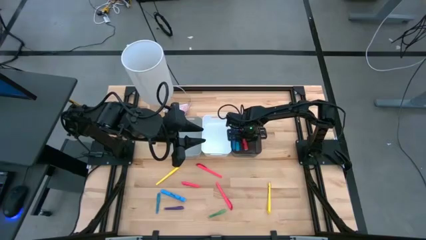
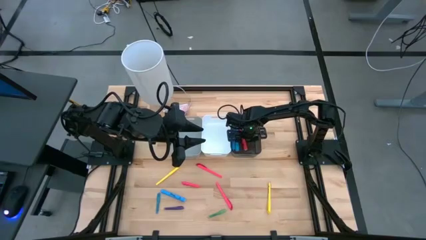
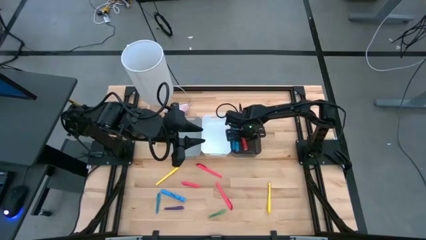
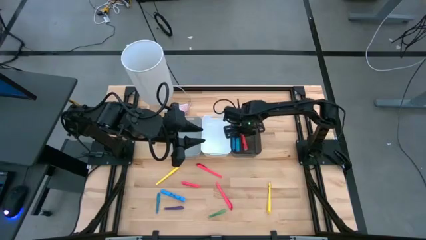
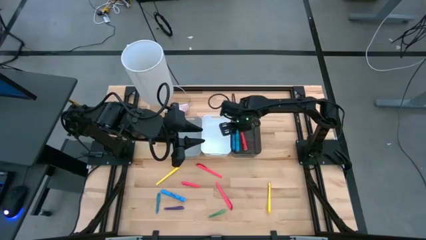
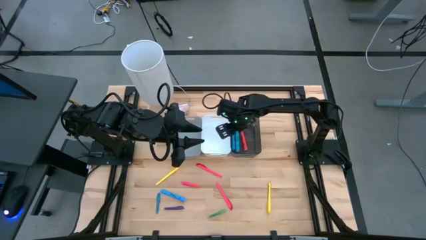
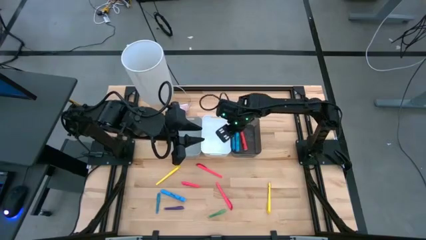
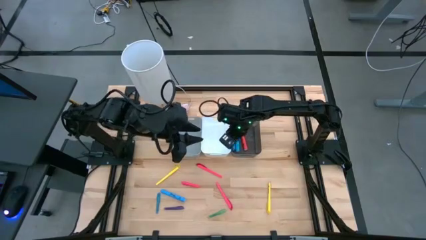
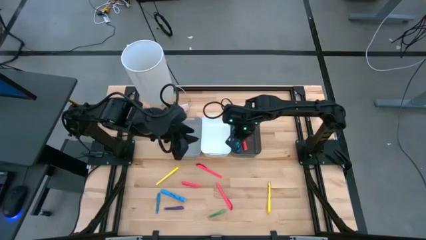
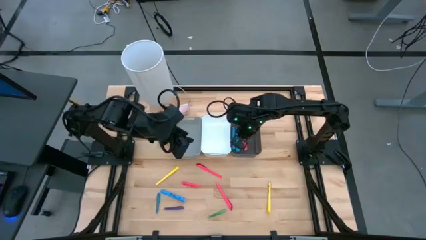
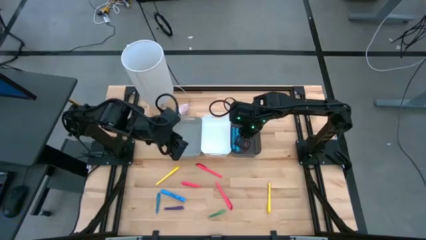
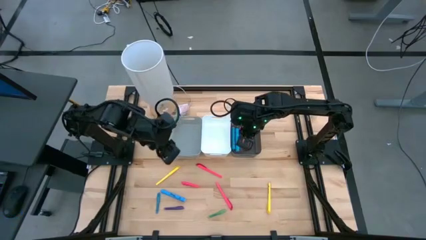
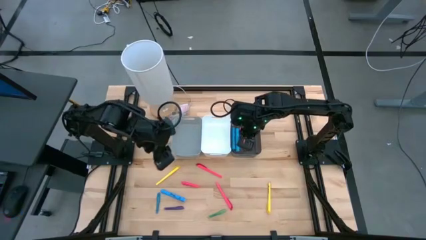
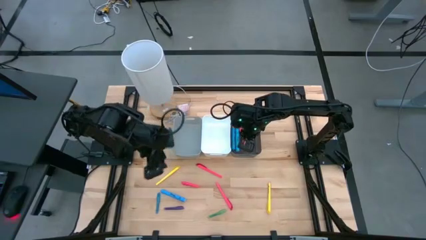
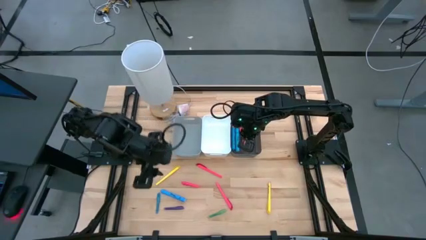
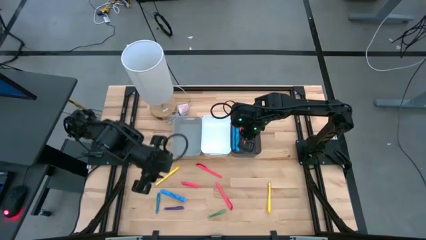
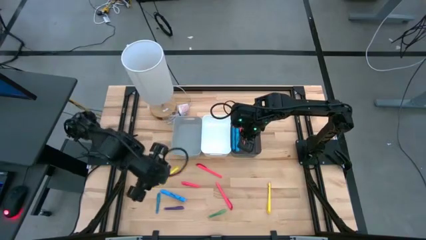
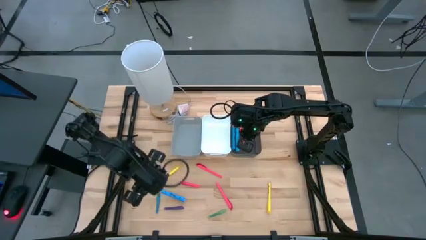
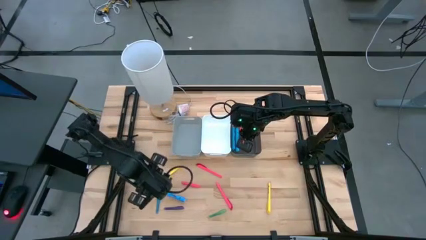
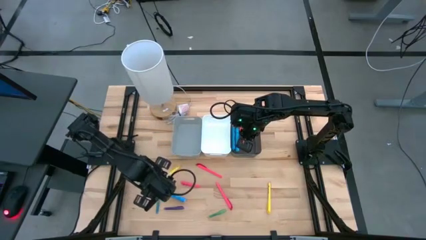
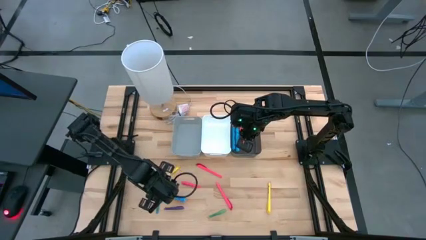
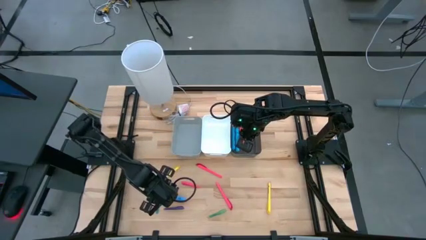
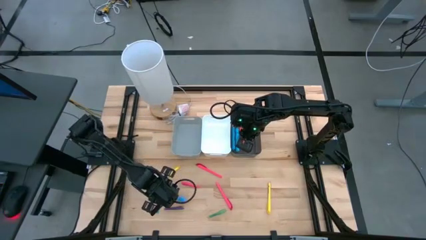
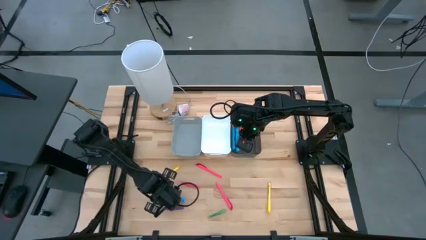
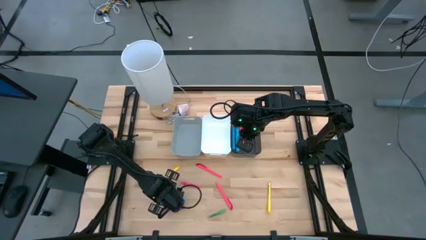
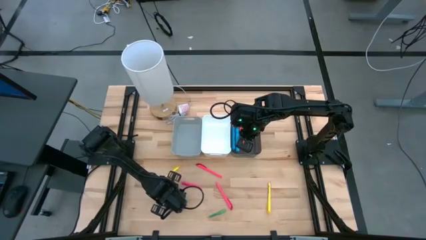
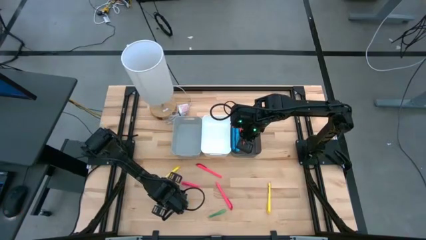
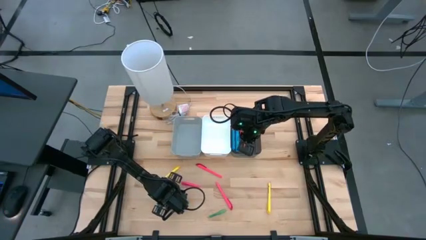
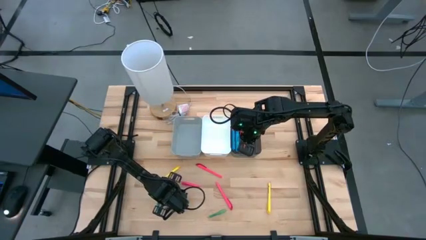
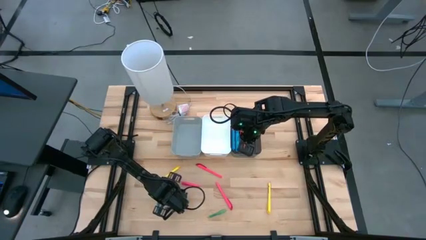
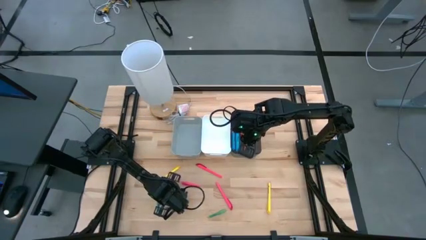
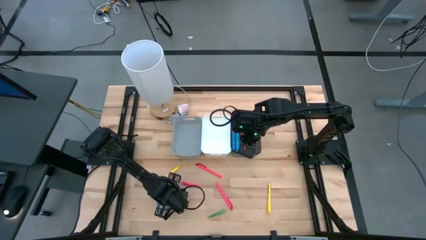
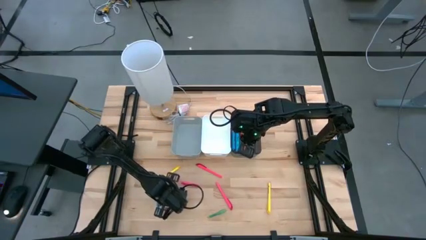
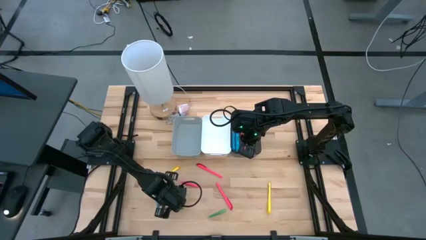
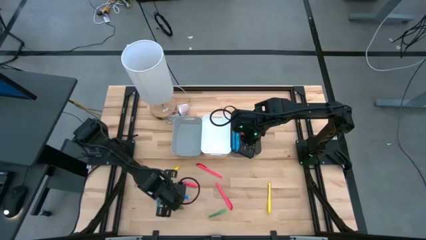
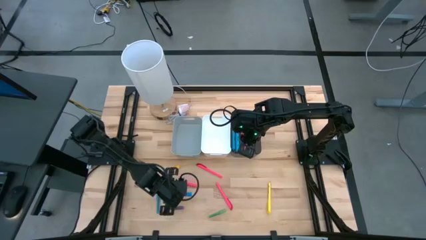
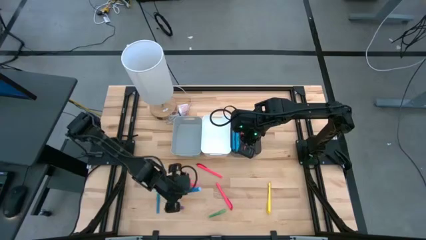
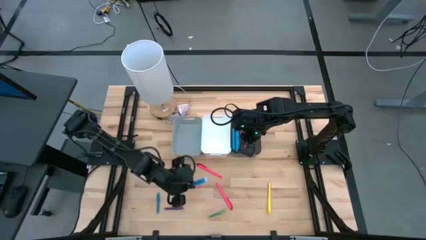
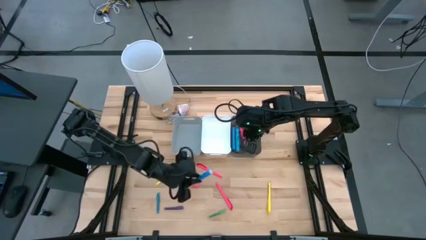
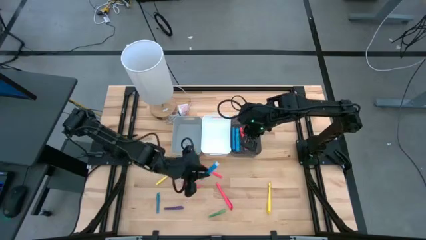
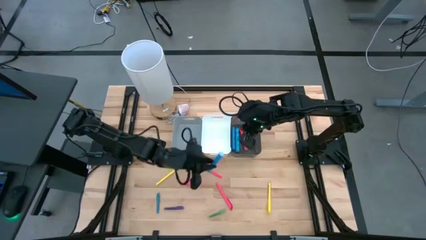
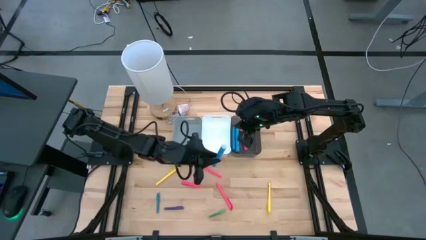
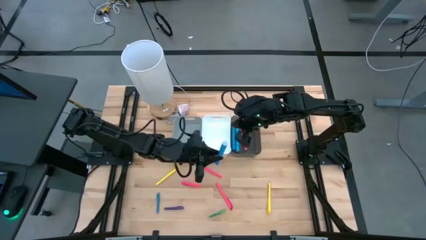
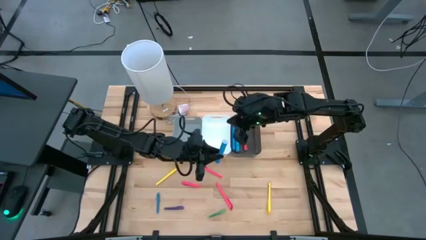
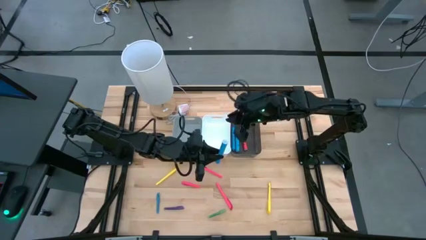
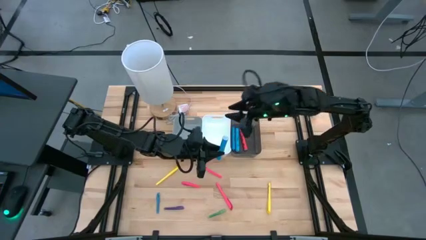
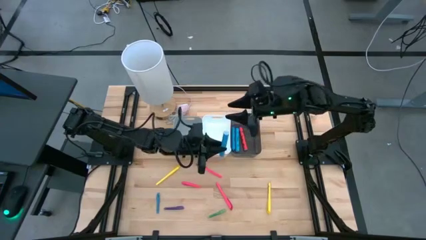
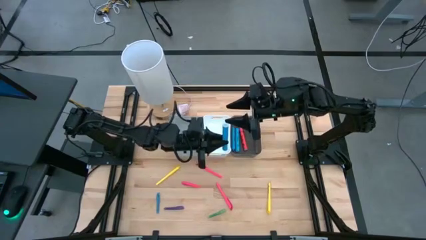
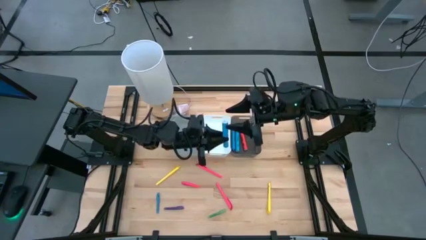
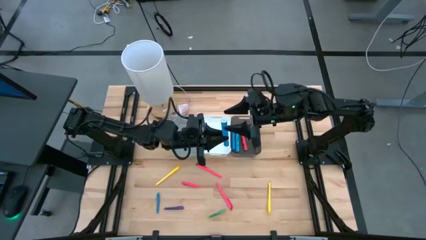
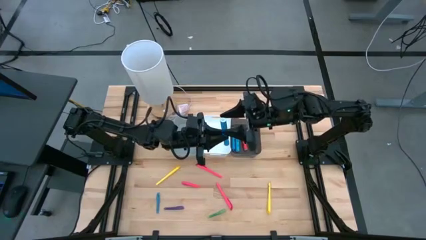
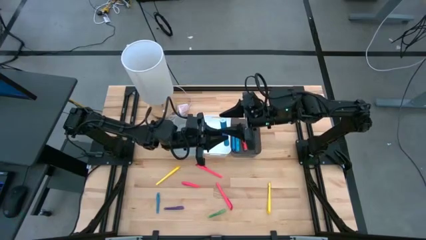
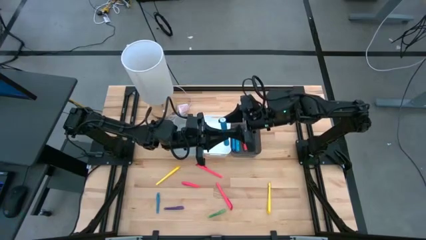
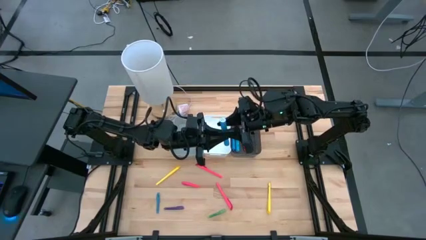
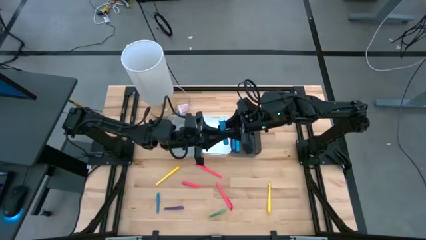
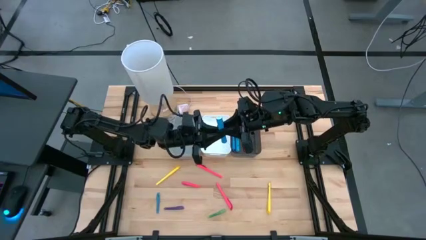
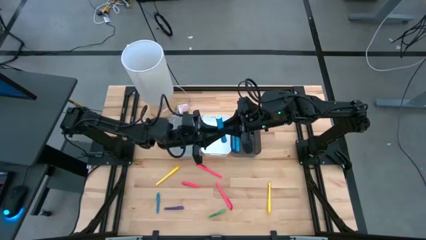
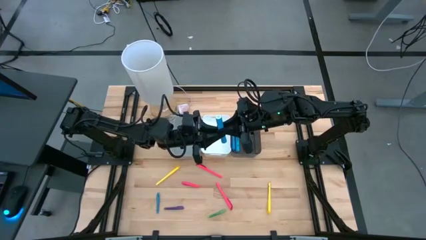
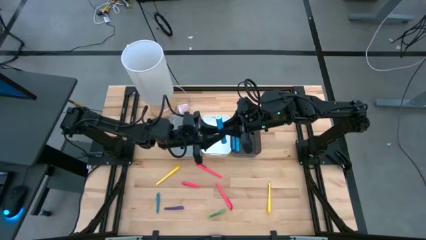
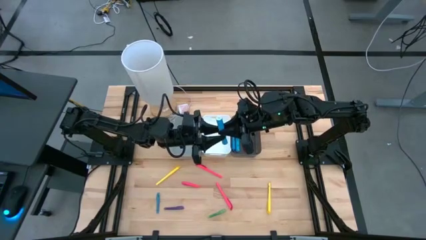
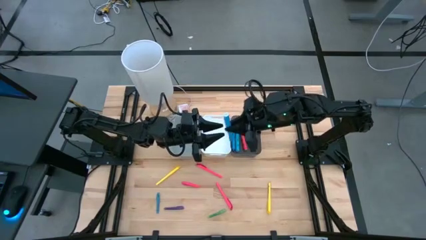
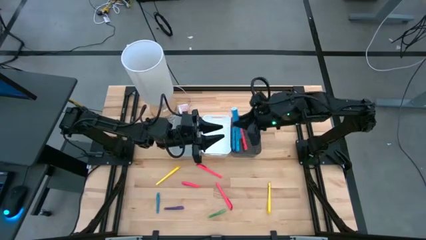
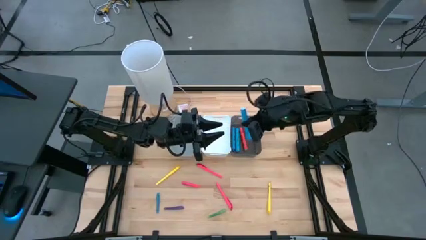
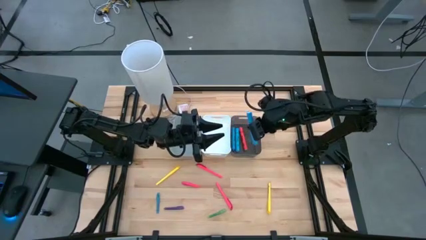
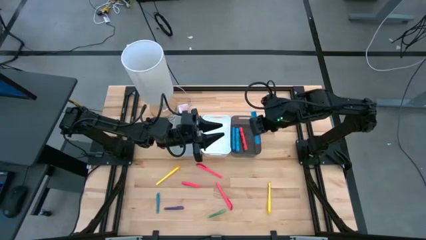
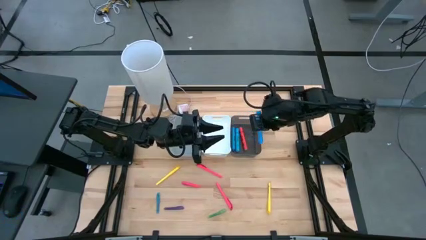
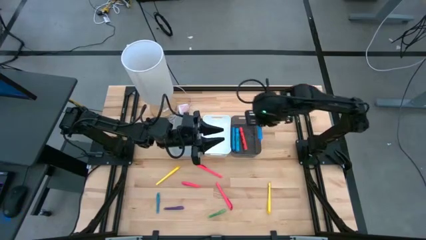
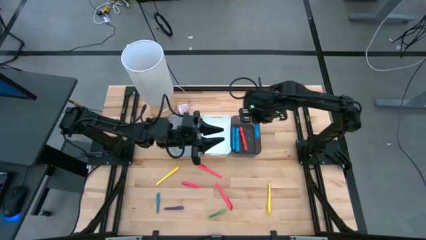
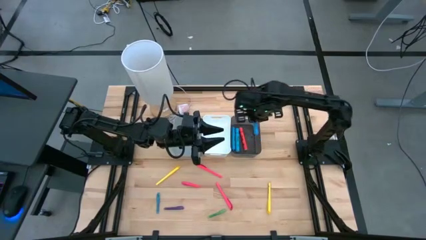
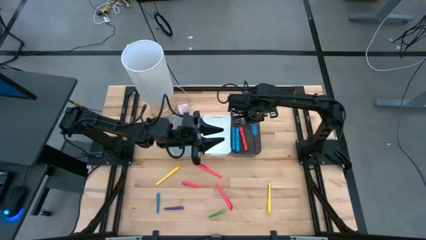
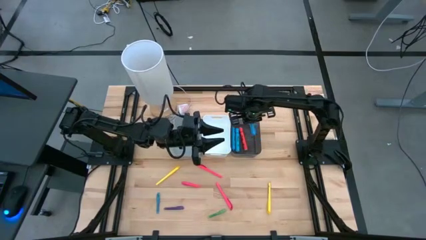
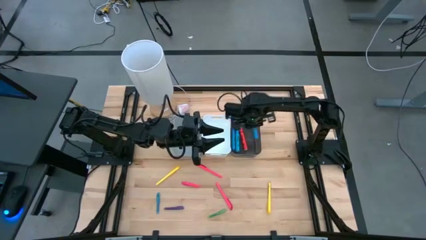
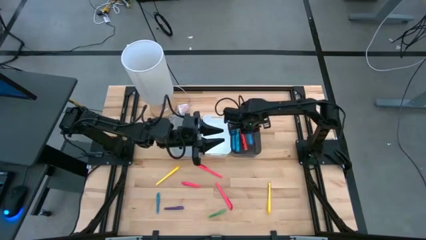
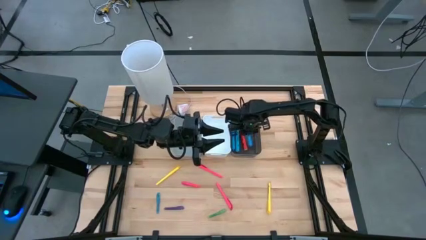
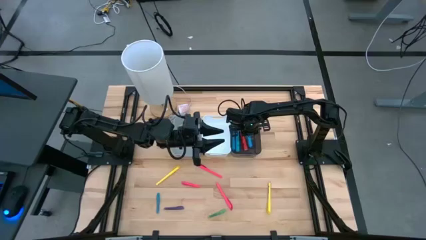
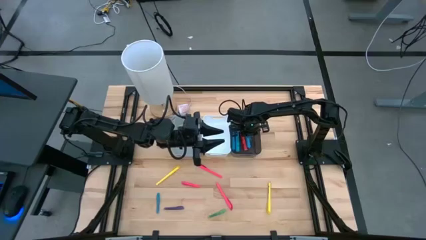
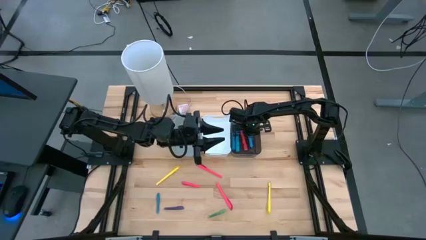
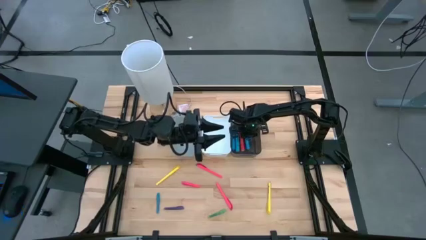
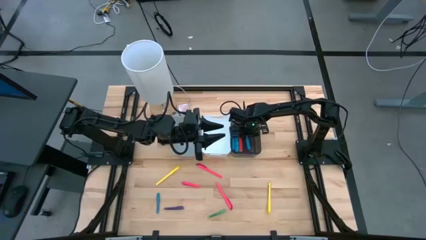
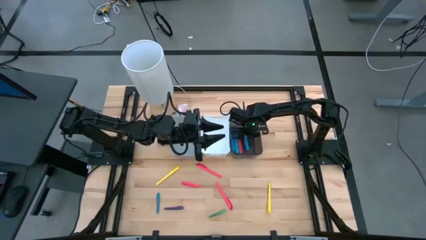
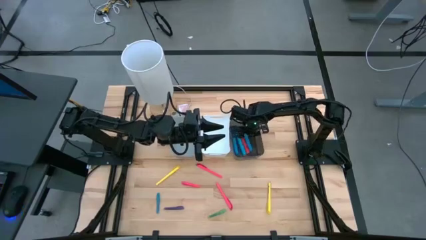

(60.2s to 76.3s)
Task: Pick & Place Markers
Put the blue marker pen into the black bin
